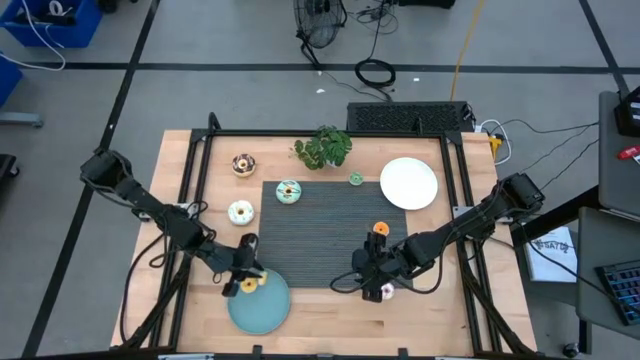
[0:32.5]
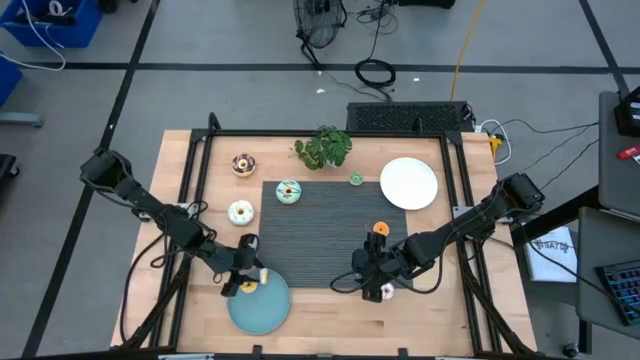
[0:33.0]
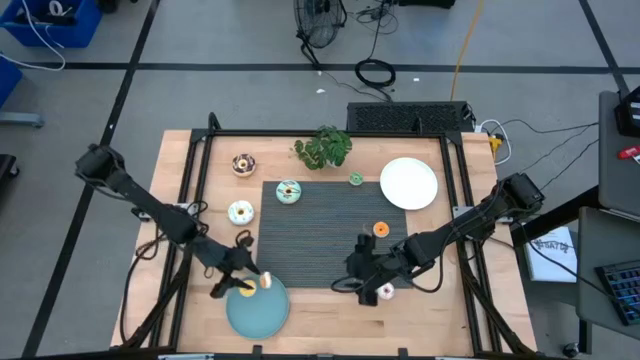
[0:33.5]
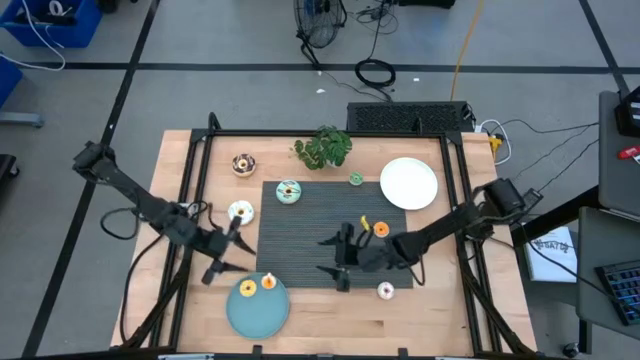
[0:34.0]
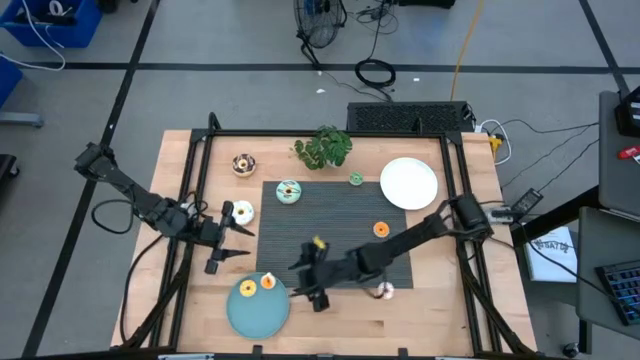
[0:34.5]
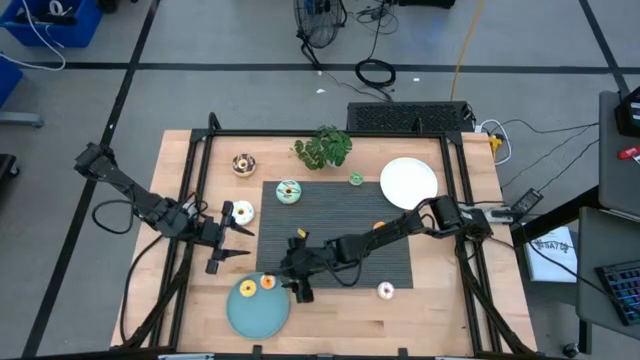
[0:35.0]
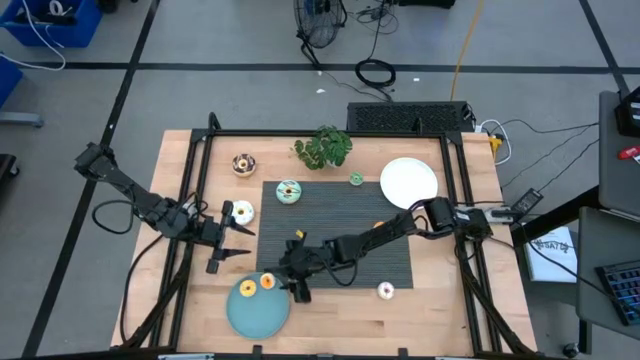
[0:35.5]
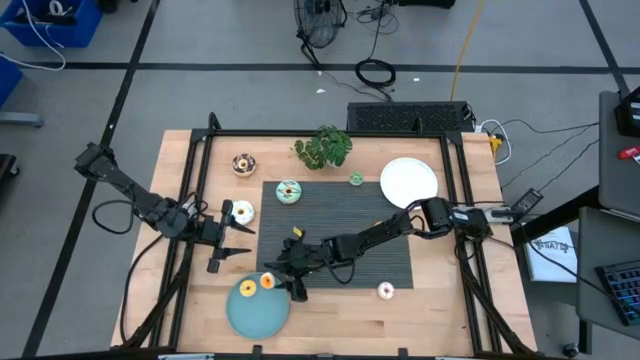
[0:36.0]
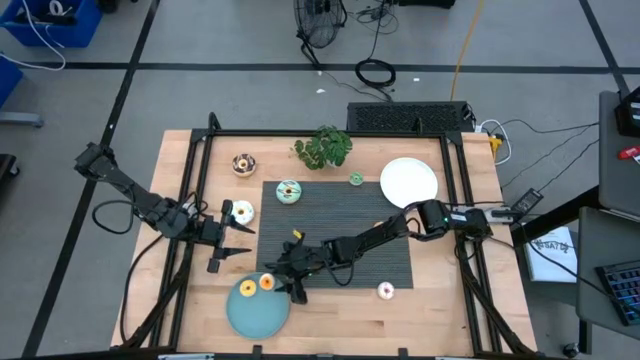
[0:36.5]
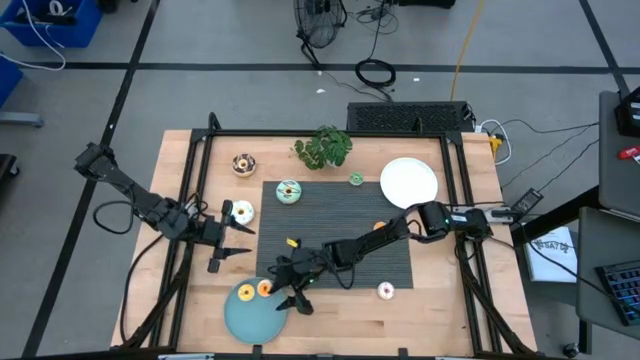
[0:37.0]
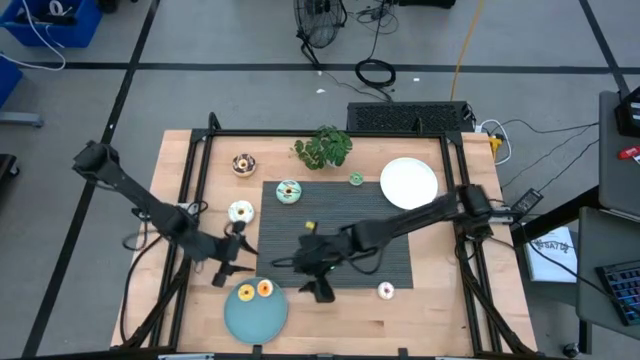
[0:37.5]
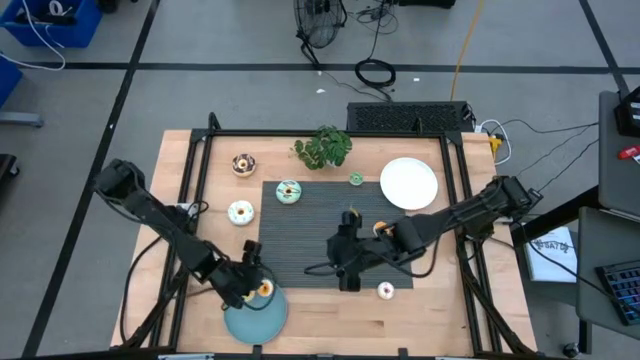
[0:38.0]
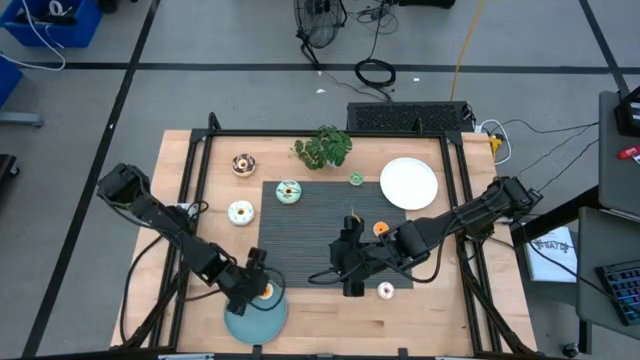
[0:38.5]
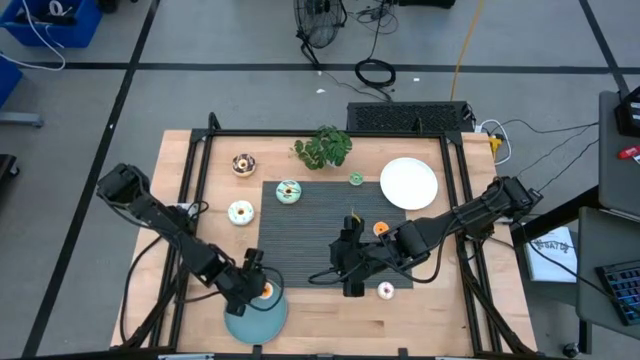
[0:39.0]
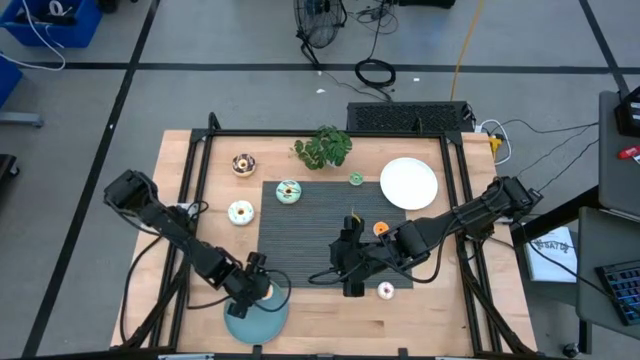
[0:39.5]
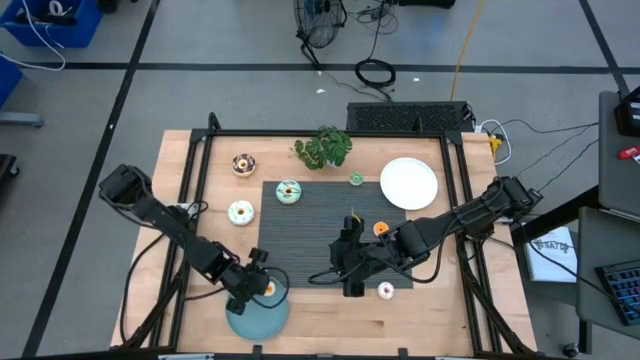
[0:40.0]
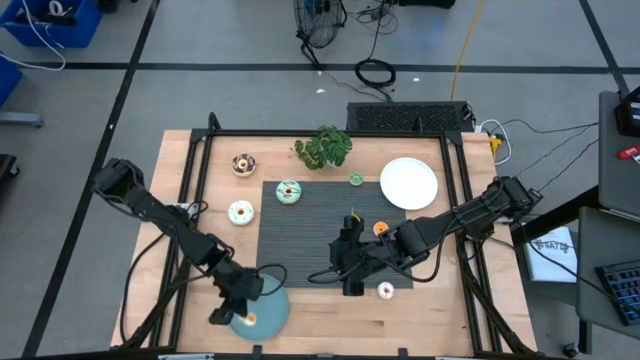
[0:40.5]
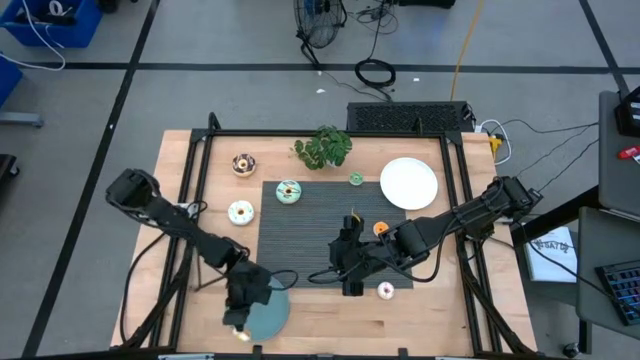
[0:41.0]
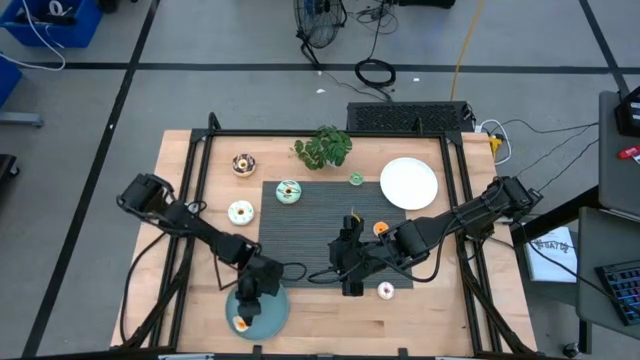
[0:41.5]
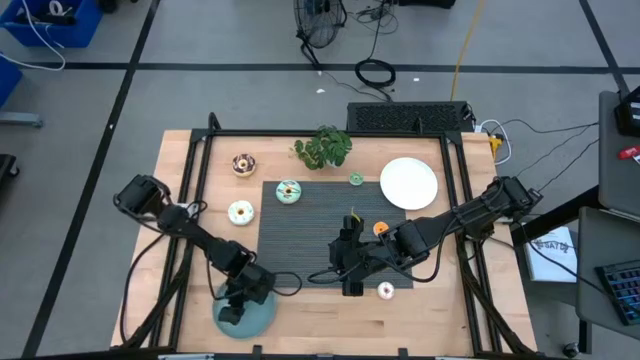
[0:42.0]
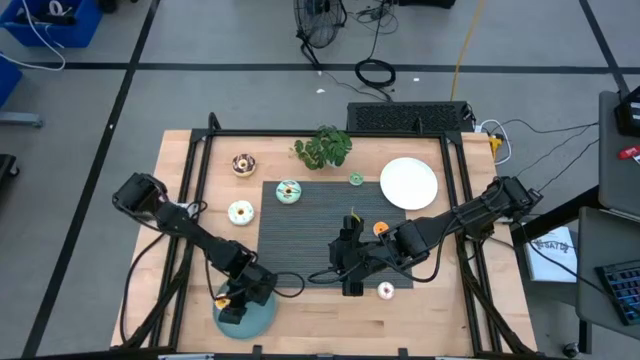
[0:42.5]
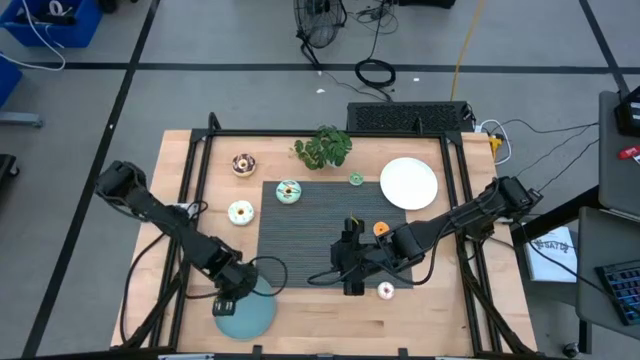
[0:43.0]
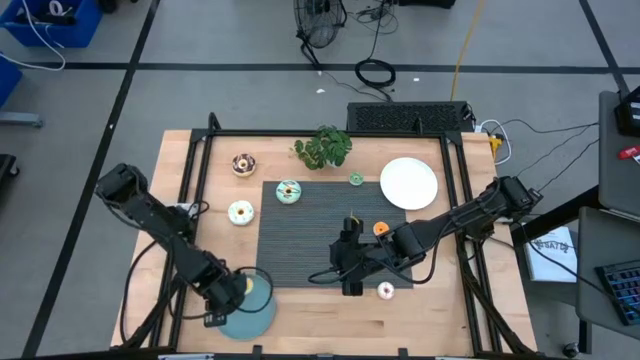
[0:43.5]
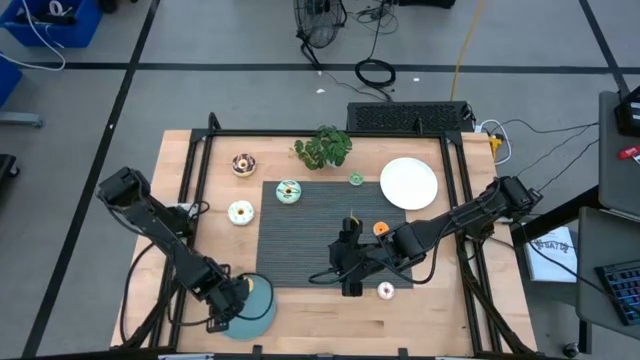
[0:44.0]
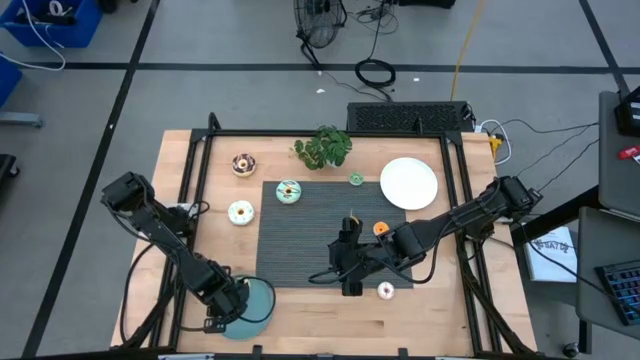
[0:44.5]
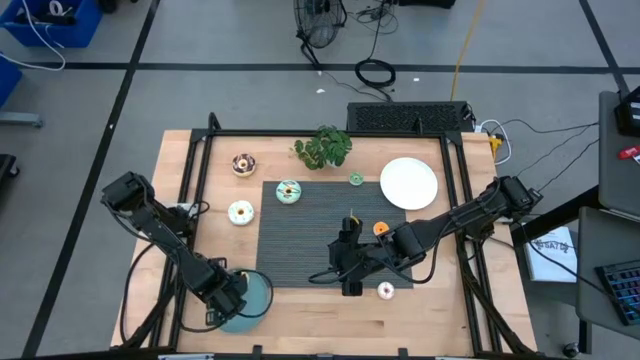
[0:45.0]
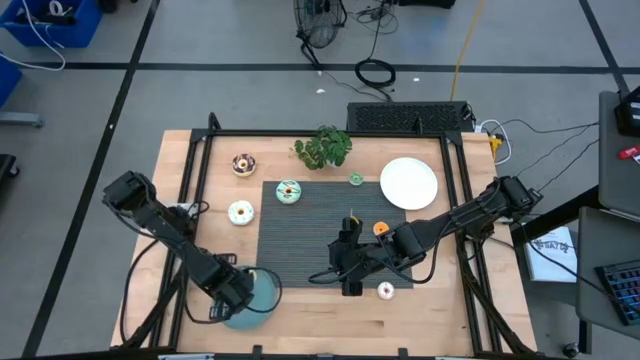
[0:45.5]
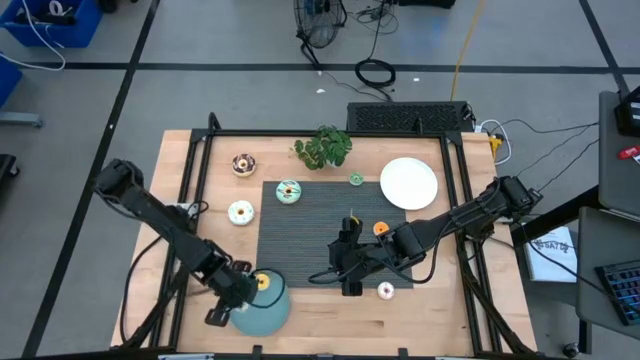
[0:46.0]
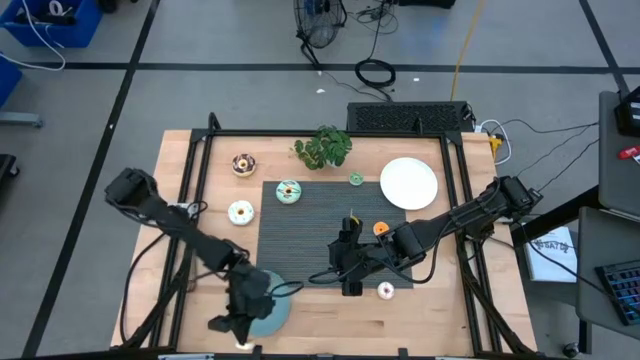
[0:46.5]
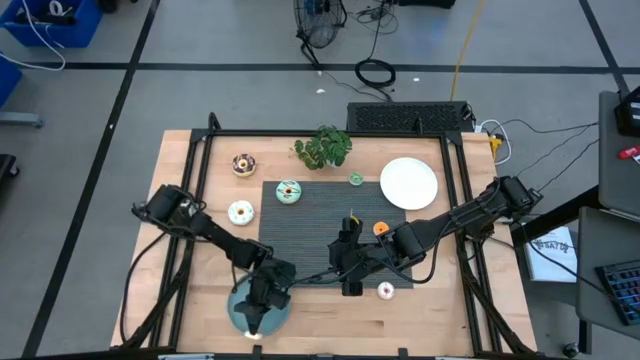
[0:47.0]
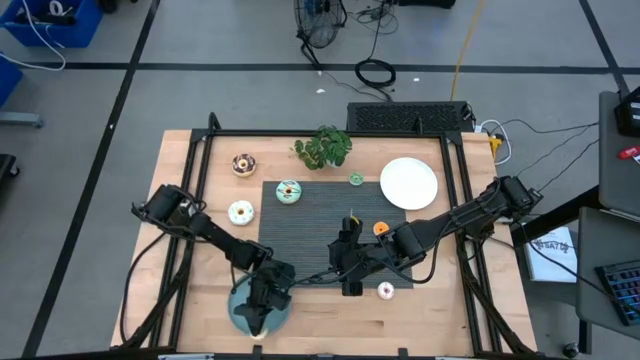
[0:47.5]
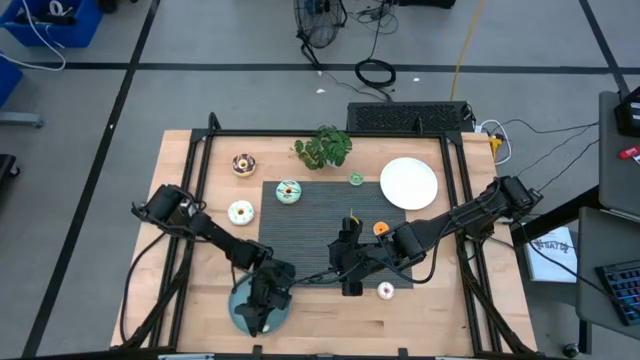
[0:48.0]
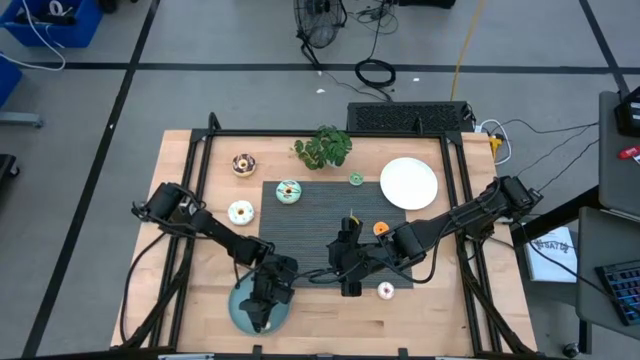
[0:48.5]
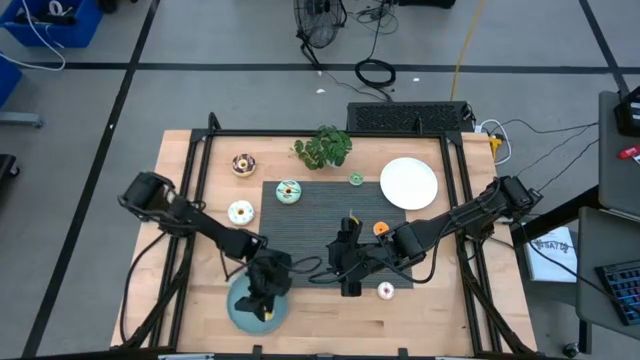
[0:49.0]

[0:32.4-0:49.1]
Task: Pick & Place donuts
Put the small yellow donut on the blue plate
